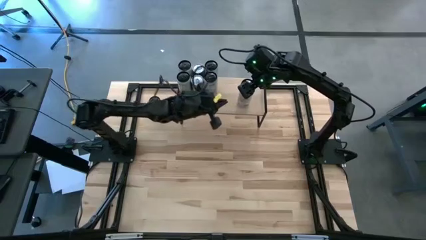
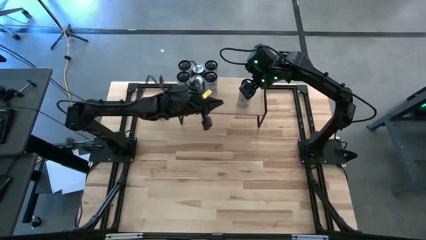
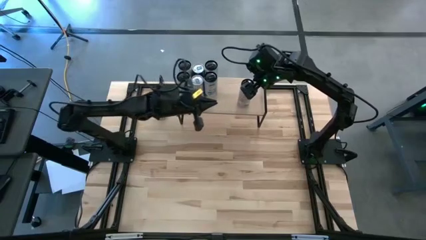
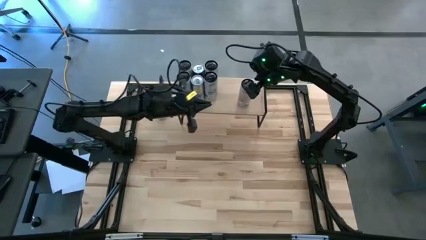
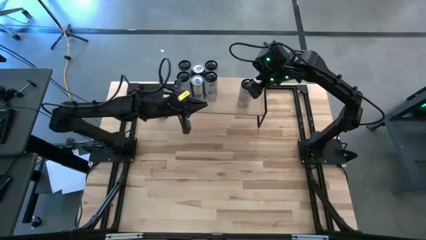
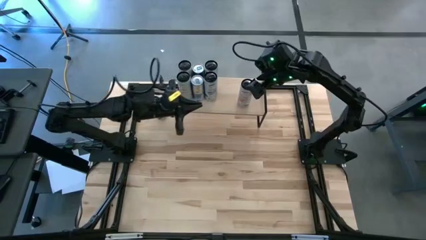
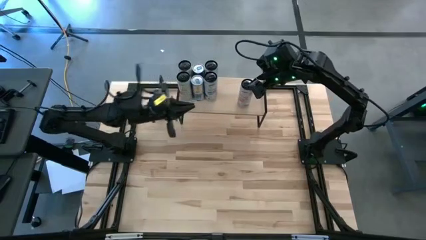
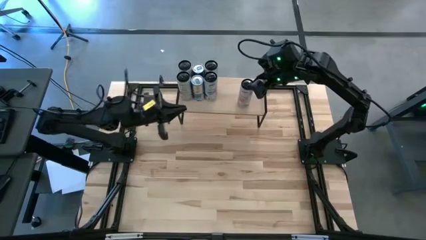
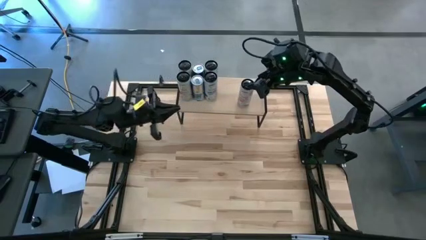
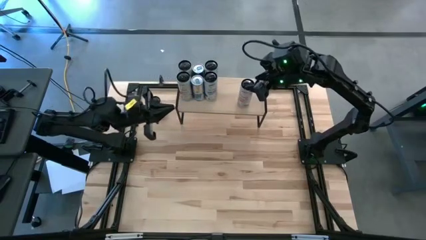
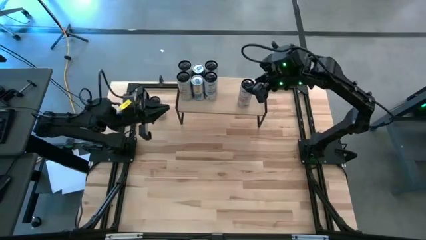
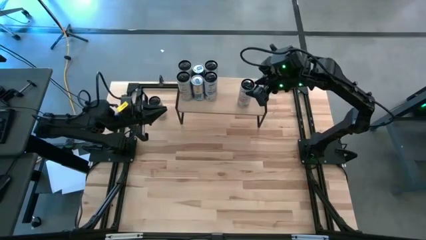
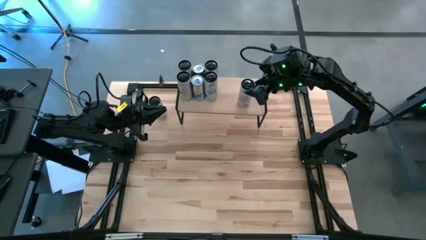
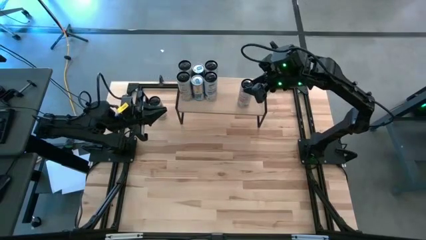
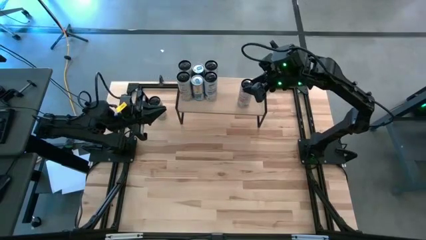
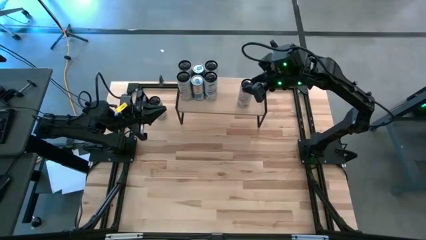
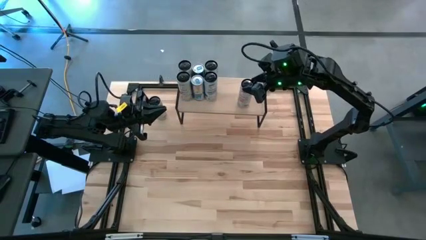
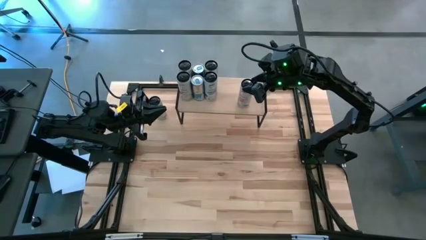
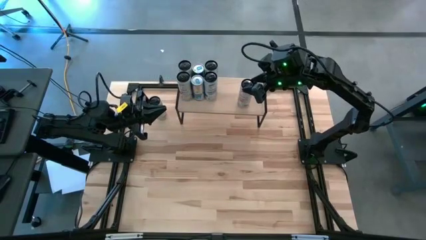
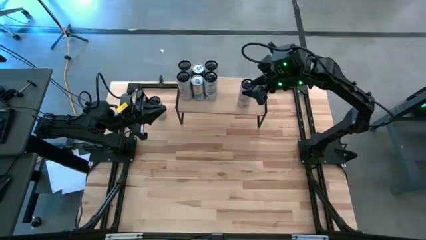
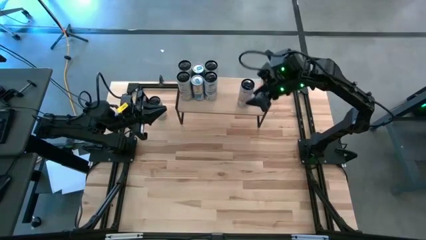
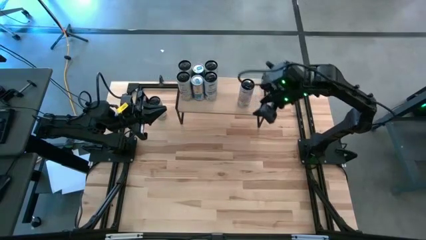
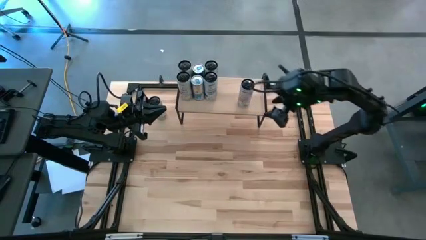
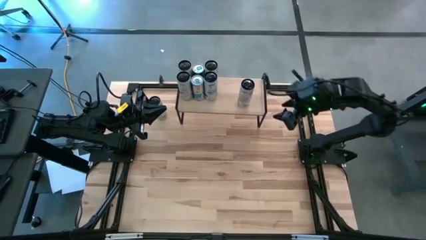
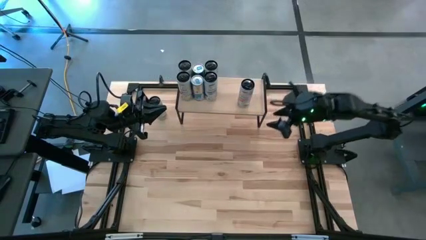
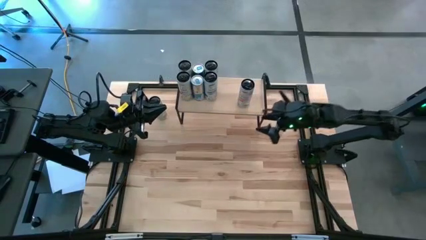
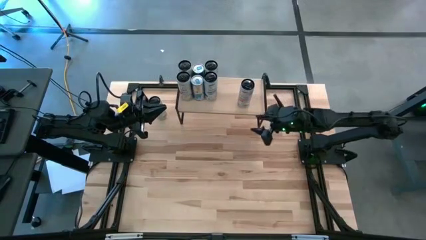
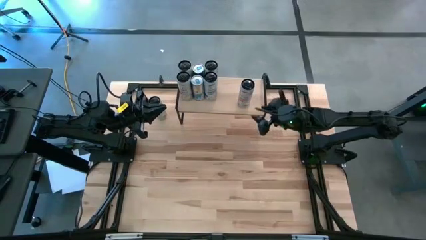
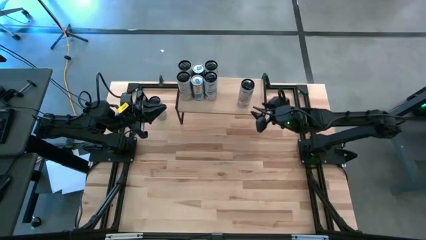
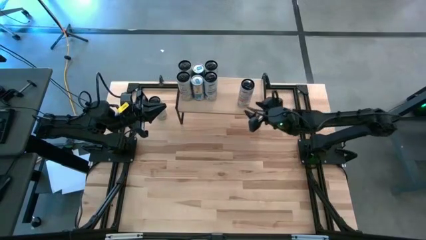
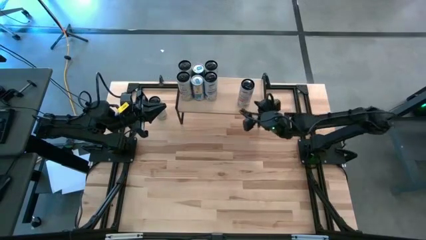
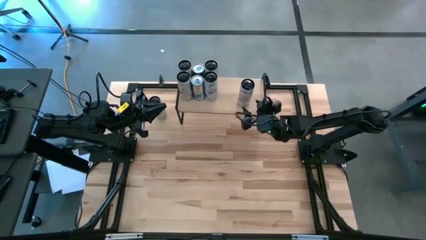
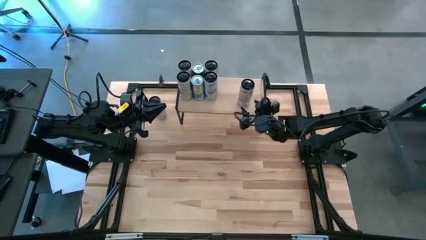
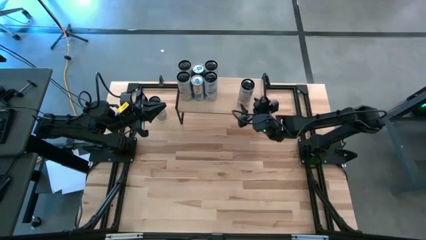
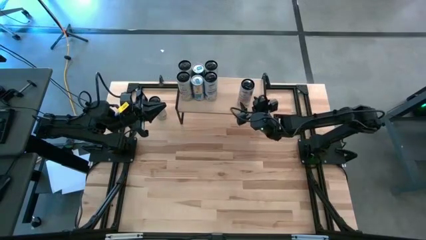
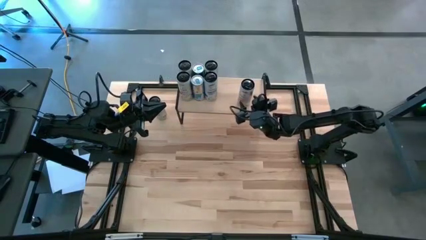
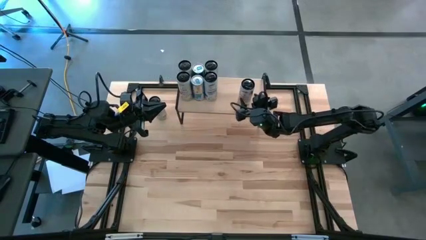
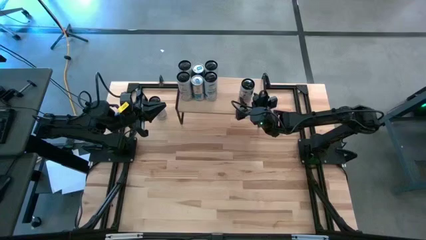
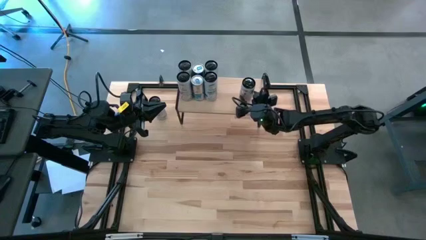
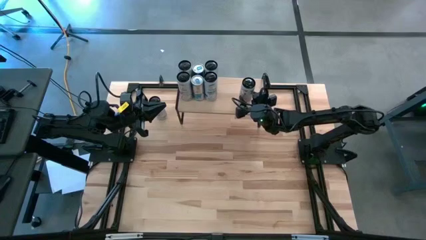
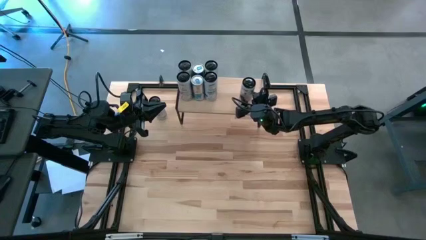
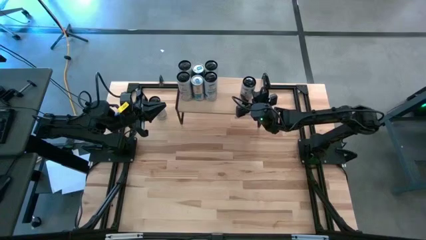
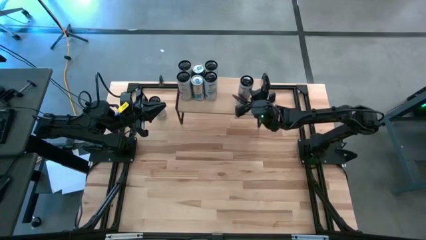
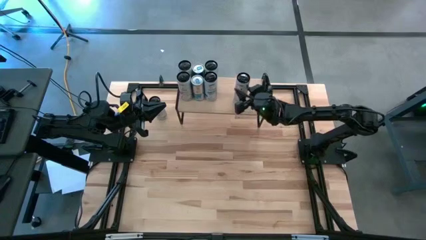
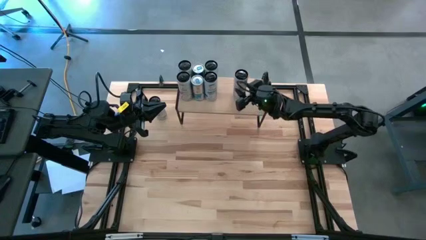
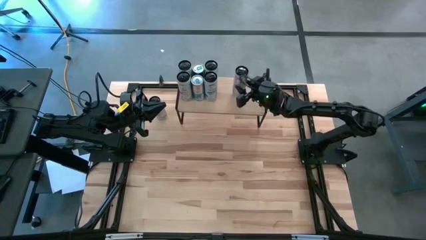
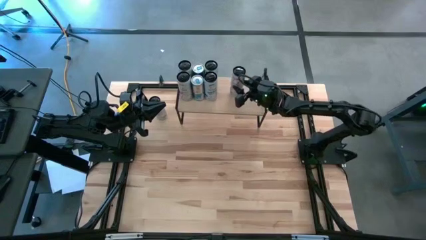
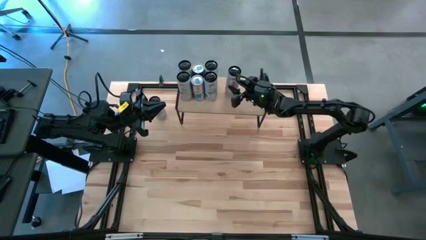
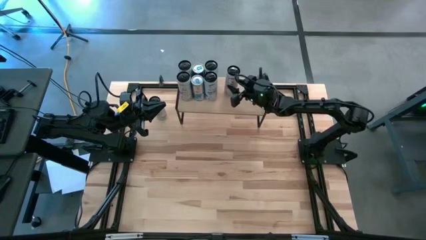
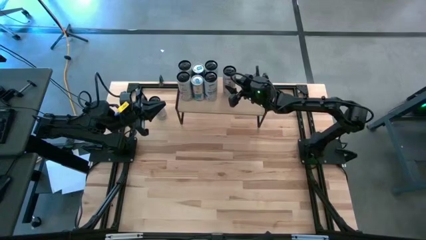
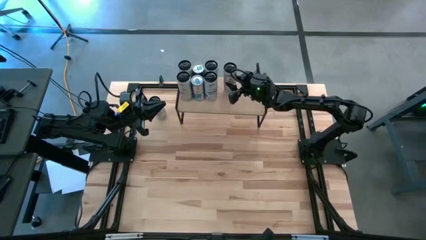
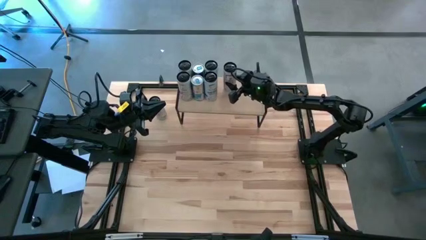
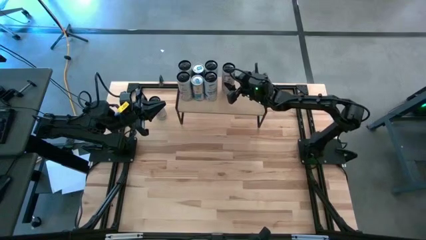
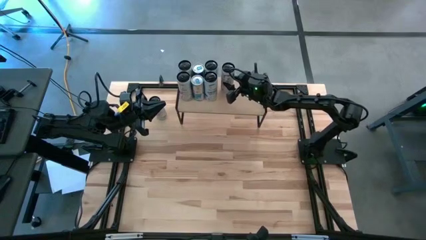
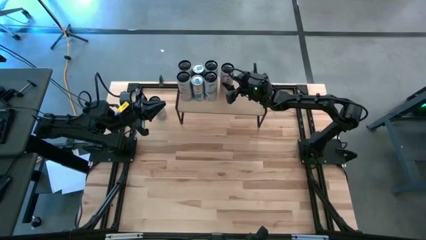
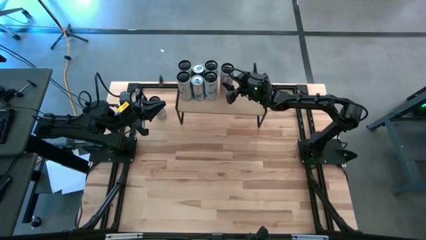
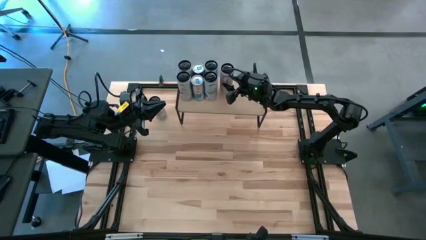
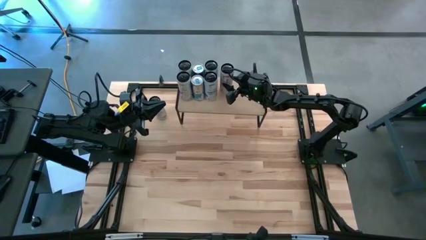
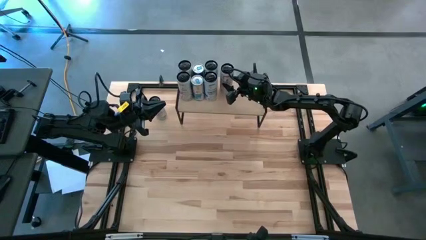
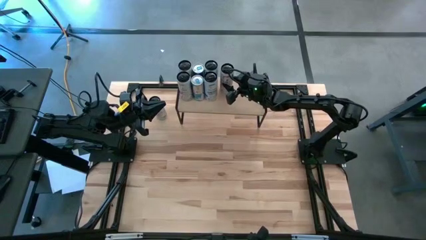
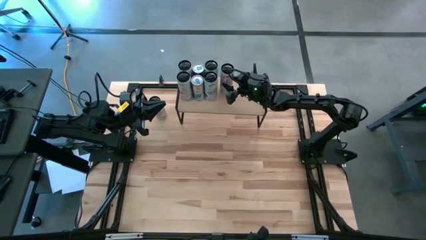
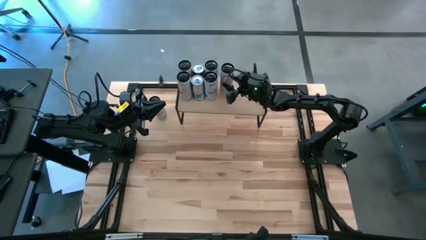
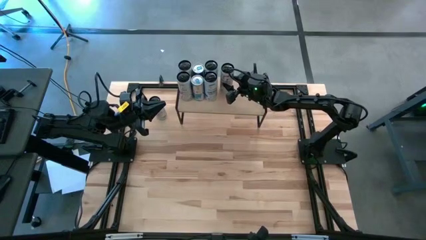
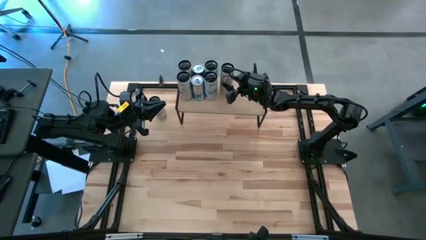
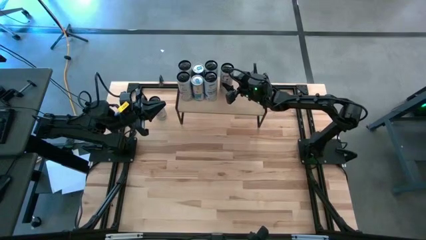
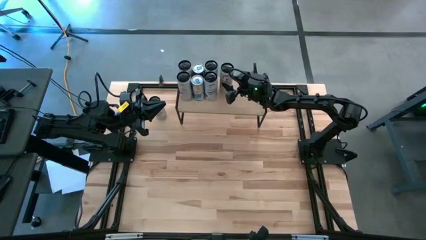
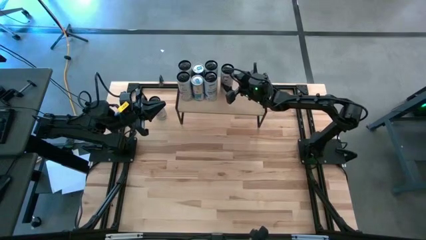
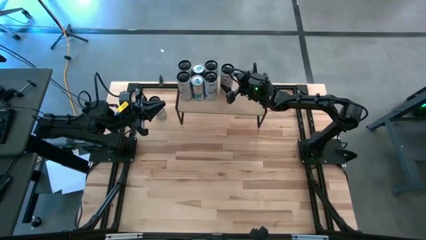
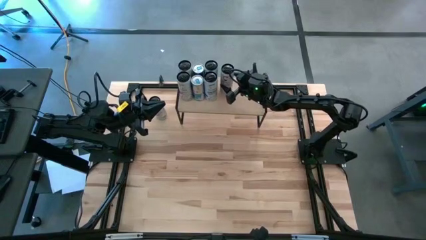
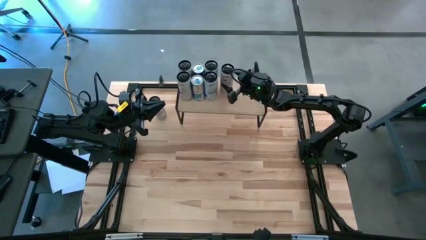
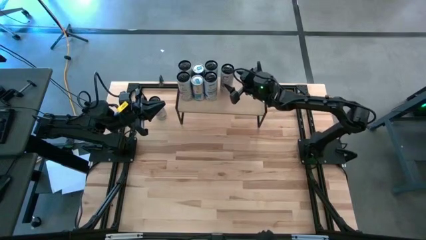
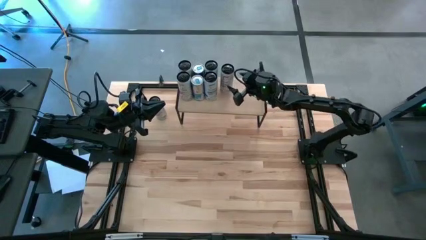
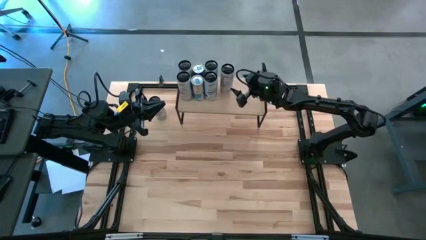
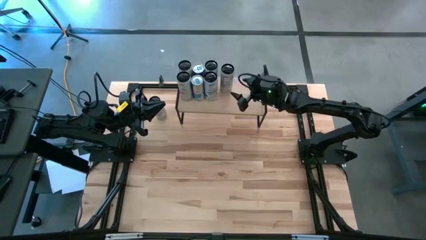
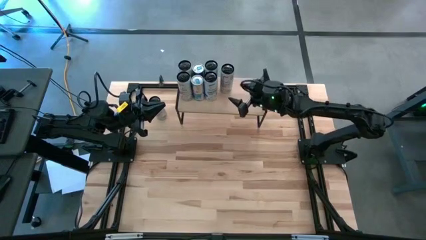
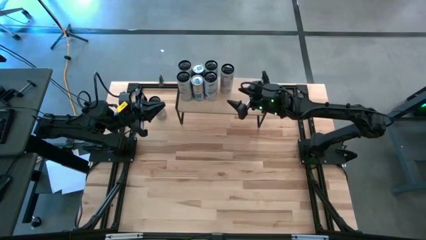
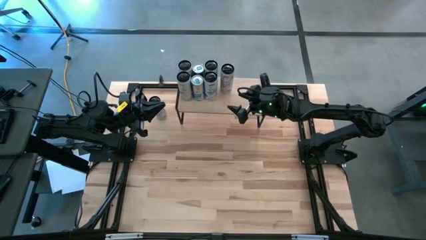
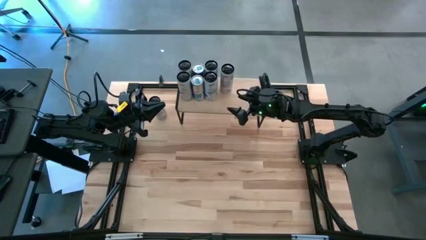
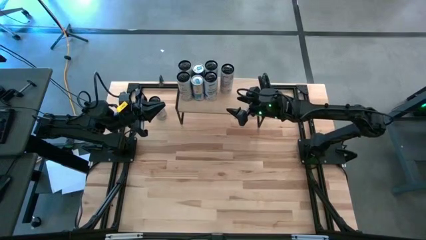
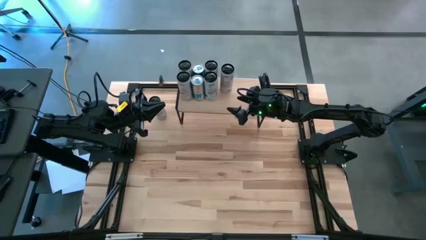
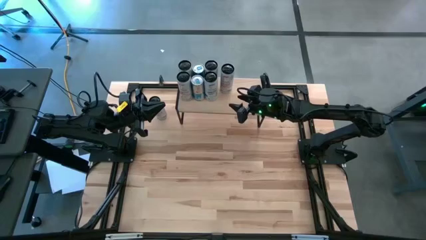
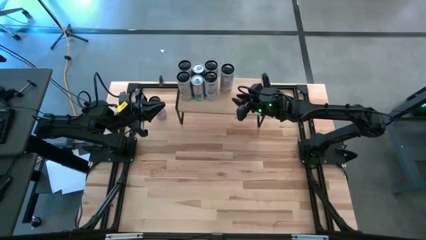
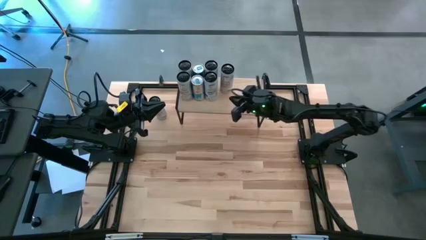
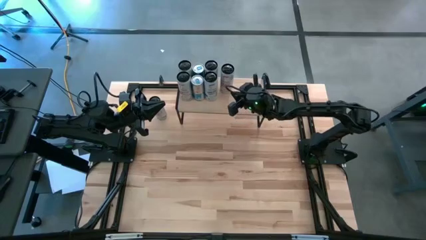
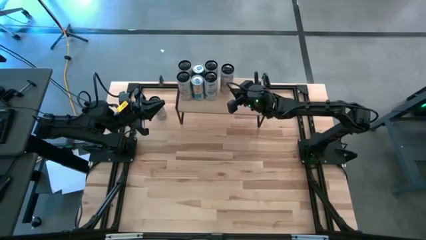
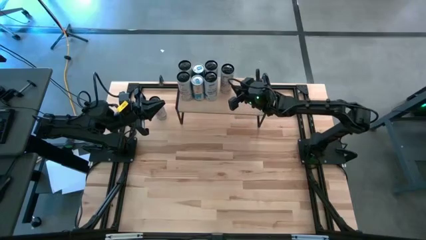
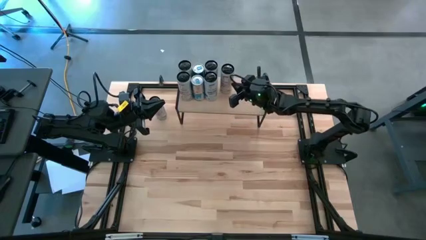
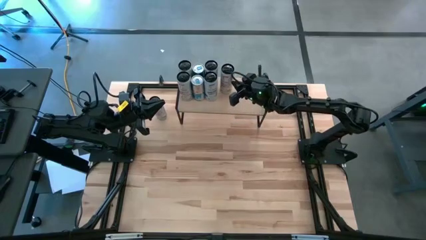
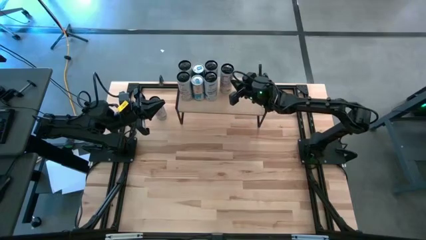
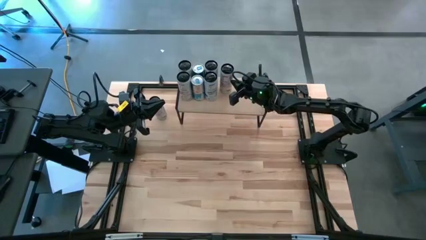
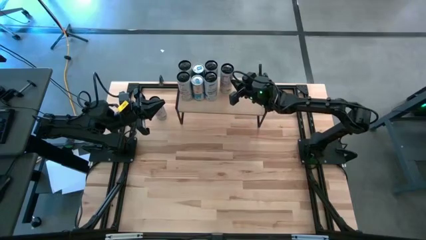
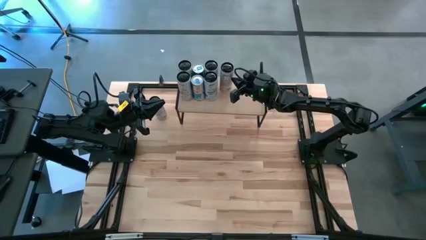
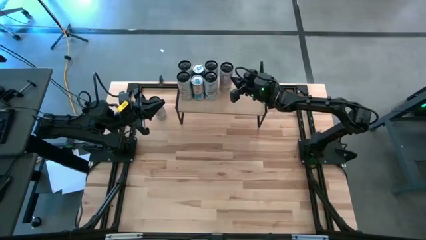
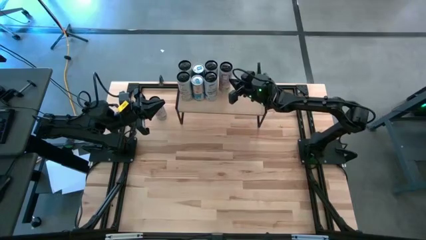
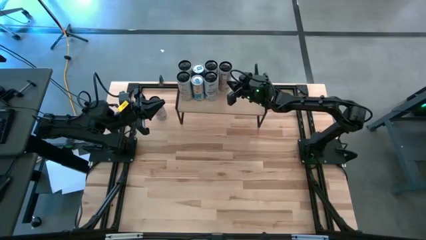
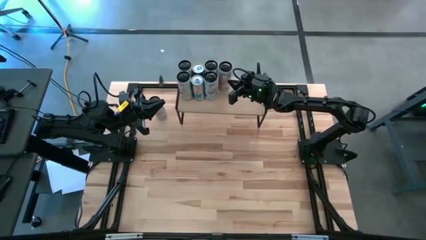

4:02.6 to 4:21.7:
Task: Place canned beverage on shelf
Put the right black soda can on the shelf
